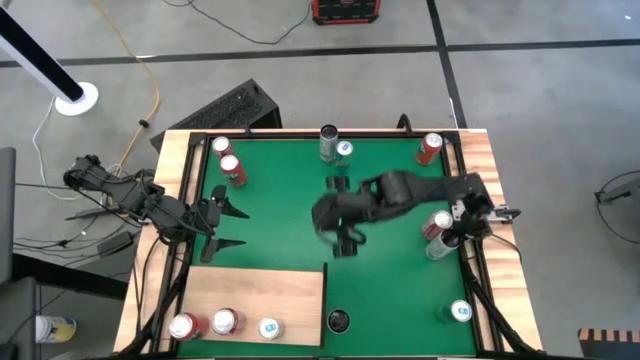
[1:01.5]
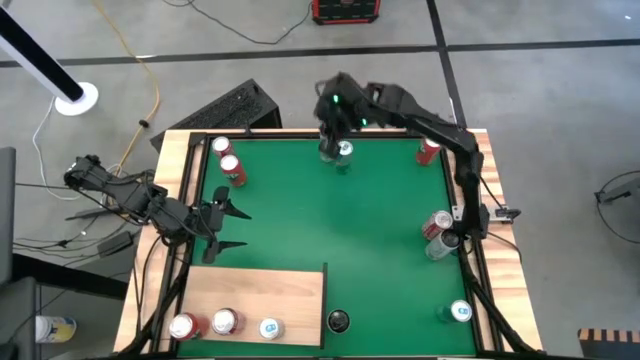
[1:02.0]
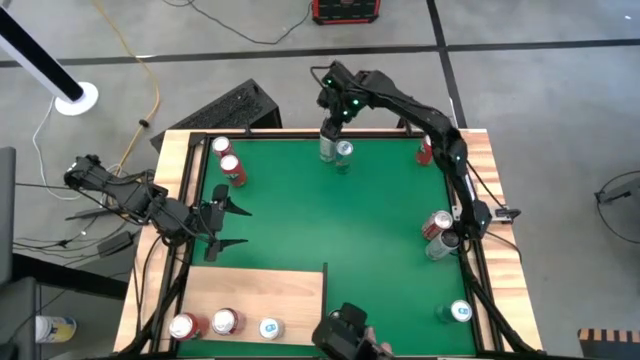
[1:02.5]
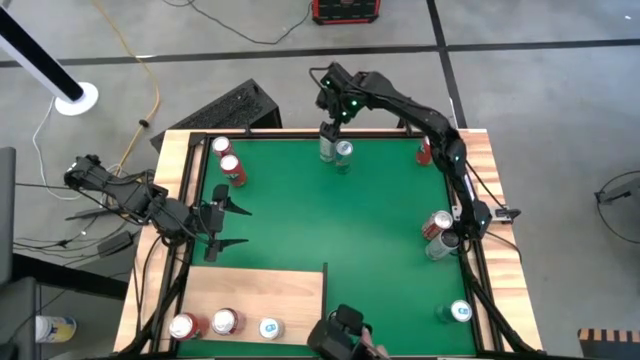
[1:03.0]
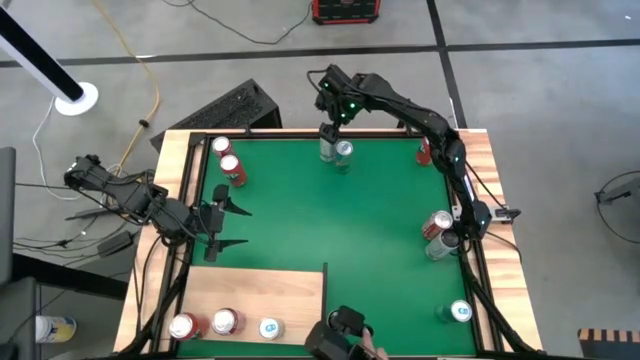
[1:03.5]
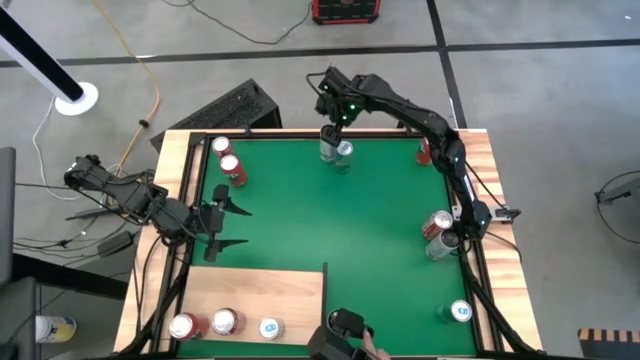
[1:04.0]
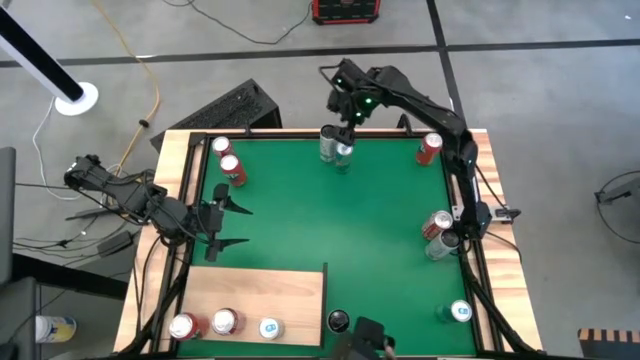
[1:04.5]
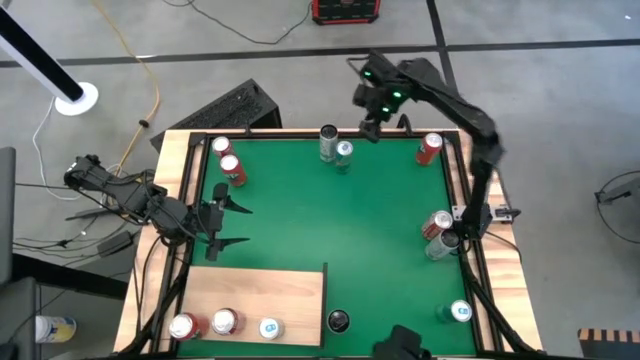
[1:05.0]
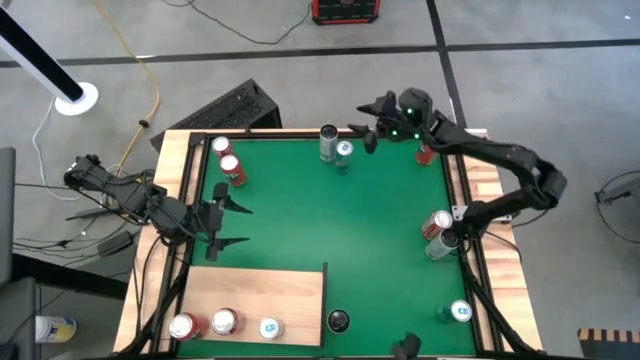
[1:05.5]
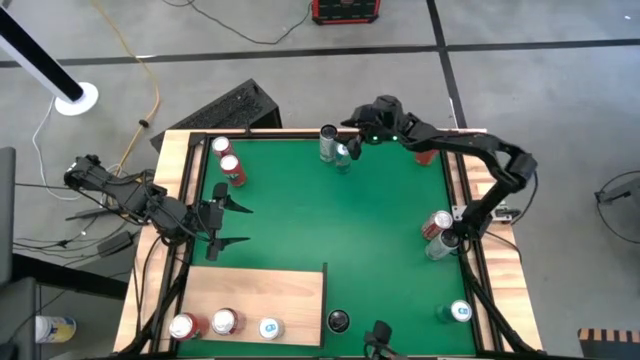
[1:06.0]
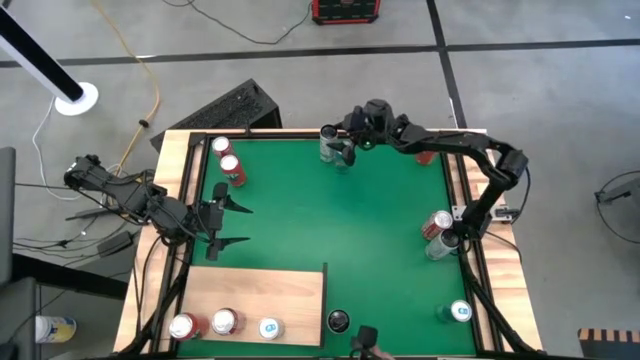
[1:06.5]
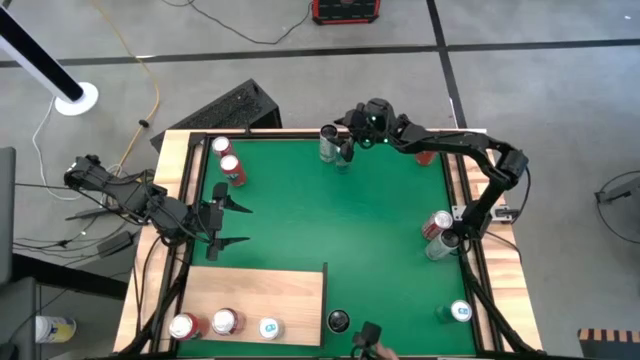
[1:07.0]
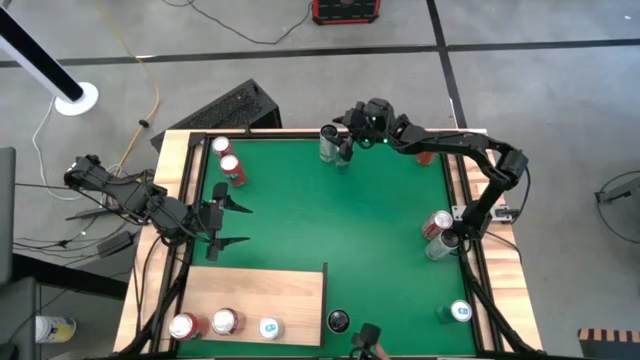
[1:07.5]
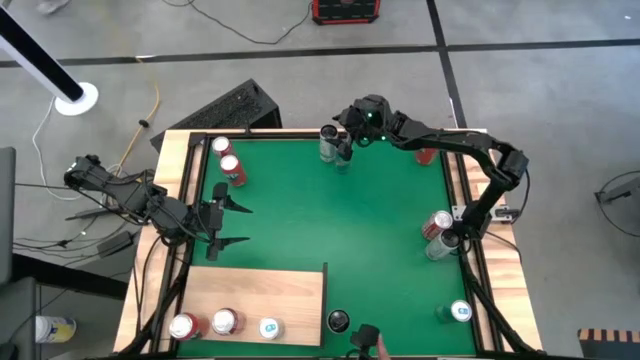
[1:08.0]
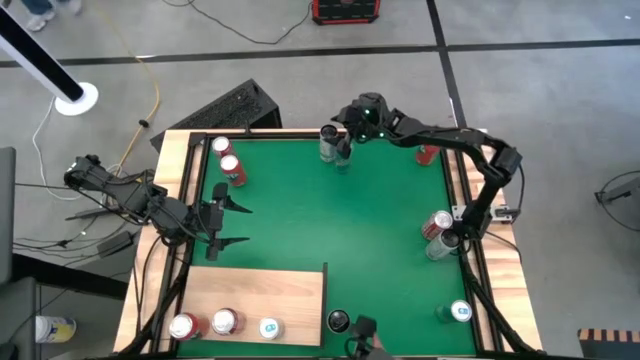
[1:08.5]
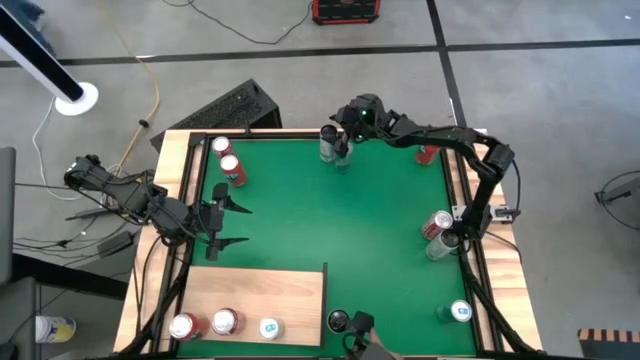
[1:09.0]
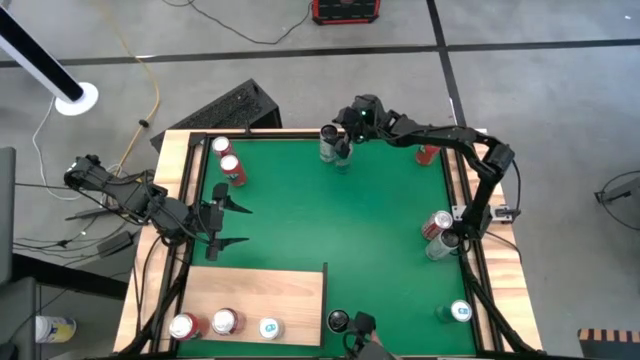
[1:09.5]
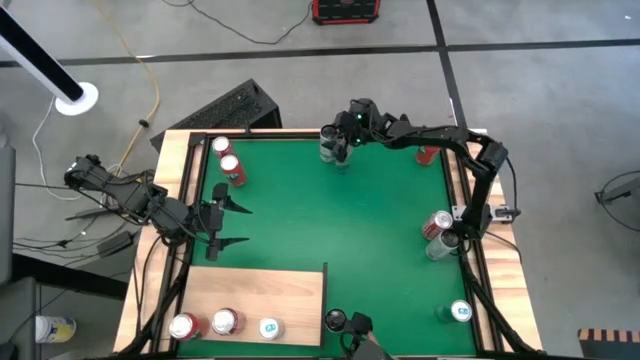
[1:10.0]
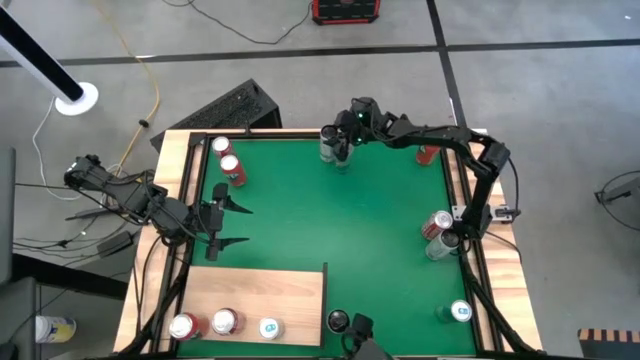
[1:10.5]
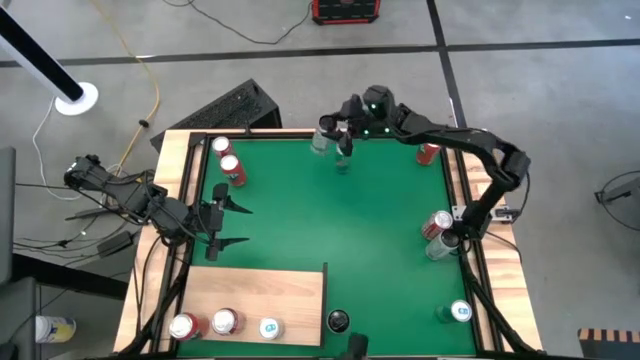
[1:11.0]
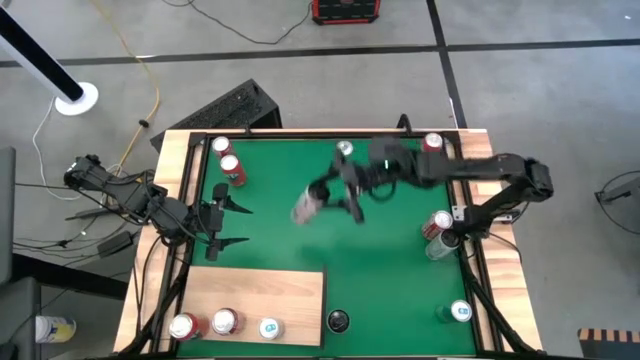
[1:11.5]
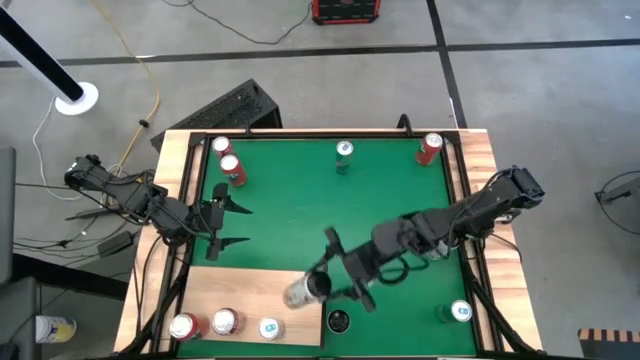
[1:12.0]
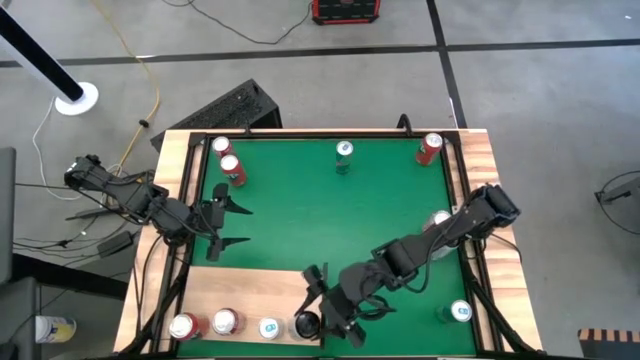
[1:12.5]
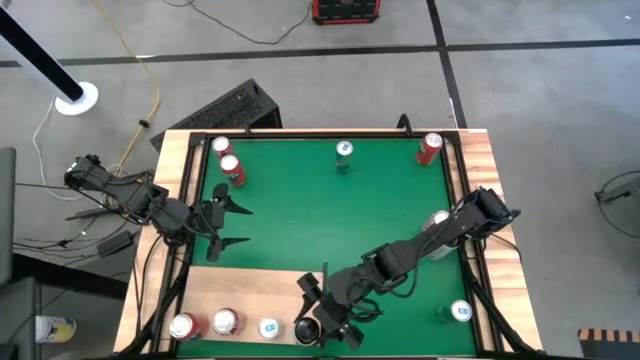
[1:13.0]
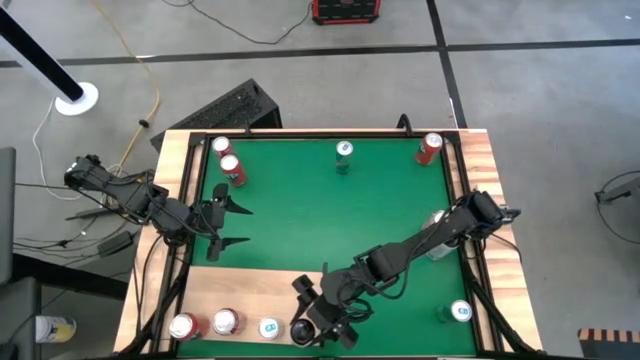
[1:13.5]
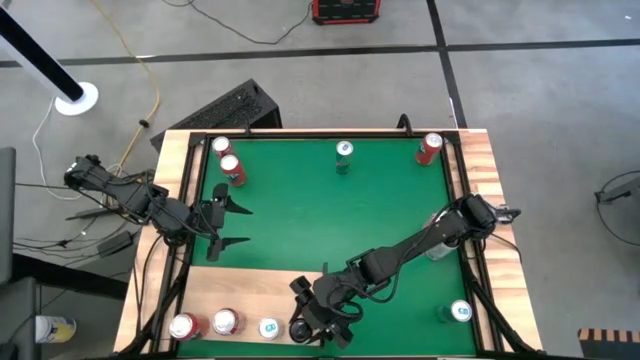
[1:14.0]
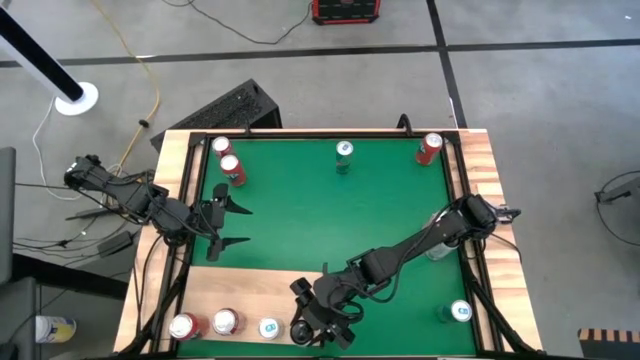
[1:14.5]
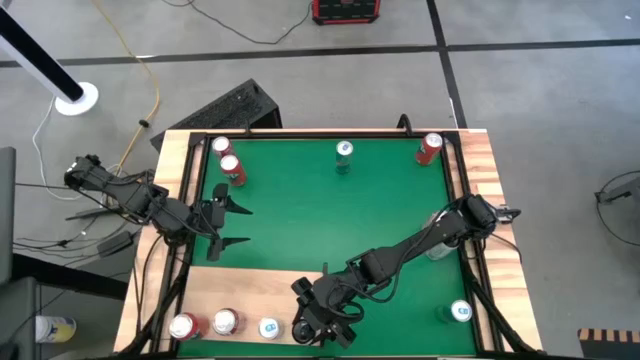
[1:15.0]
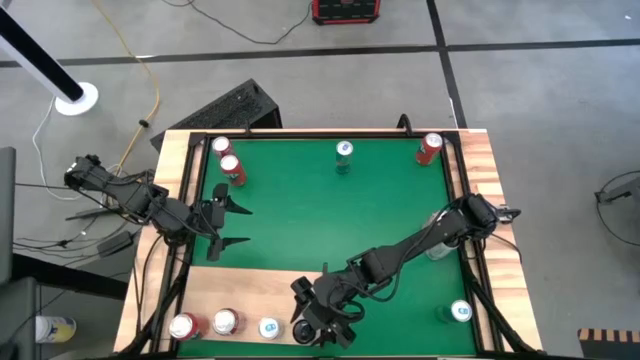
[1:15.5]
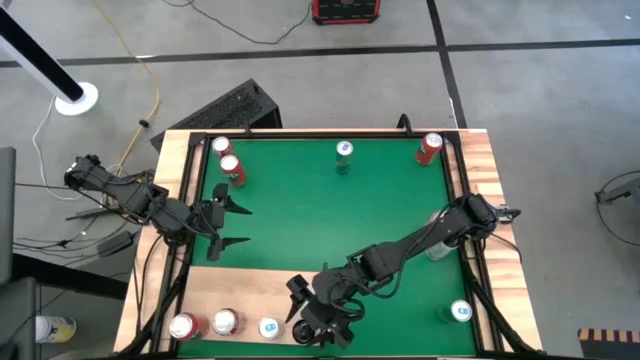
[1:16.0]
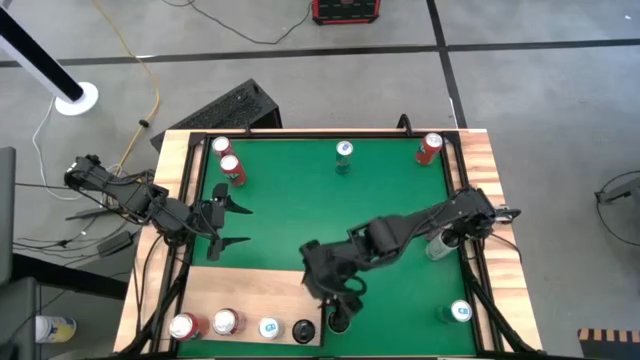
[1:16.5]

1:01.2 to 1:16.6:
Task: Place canned beverage on shelf
Put the top white yellow soda can on the shelf
